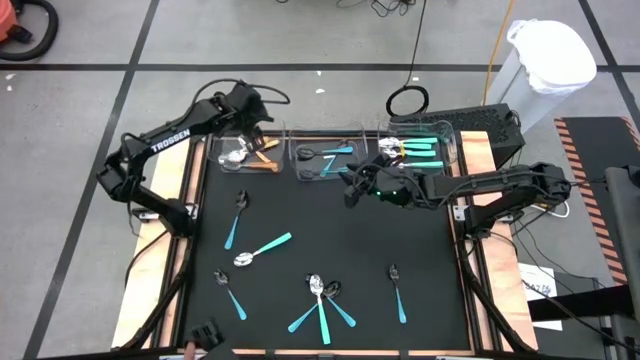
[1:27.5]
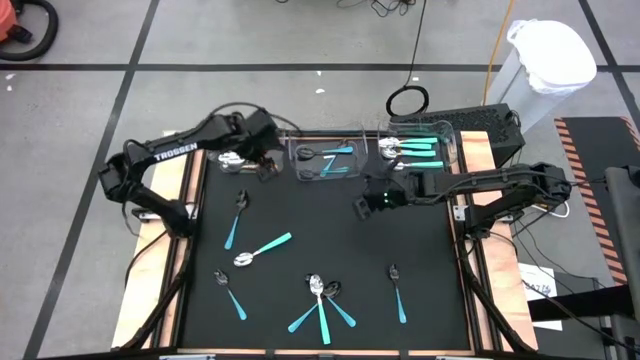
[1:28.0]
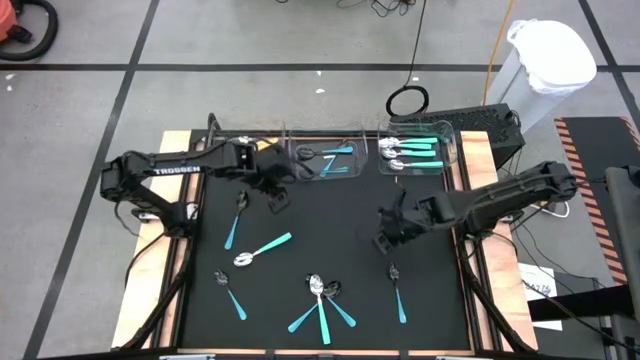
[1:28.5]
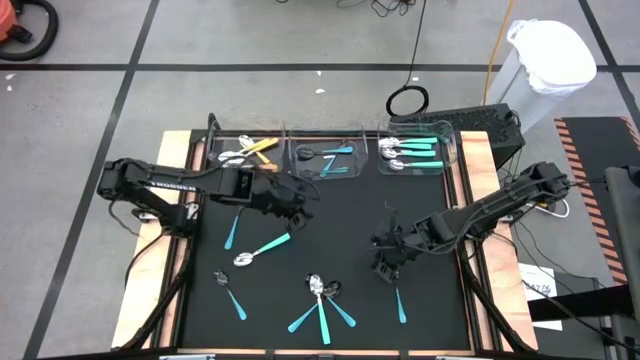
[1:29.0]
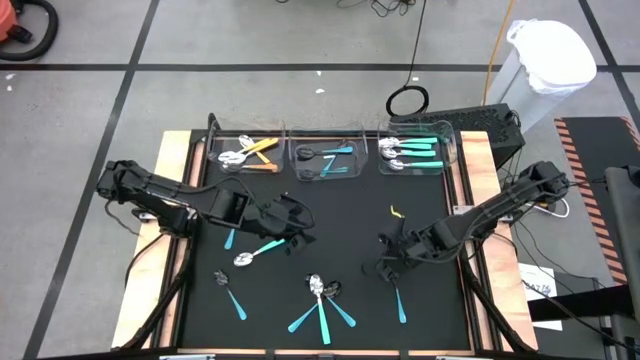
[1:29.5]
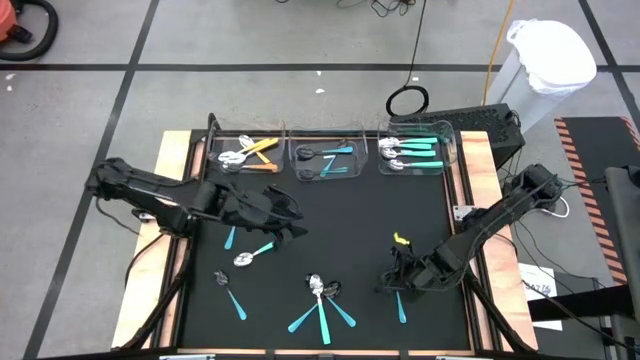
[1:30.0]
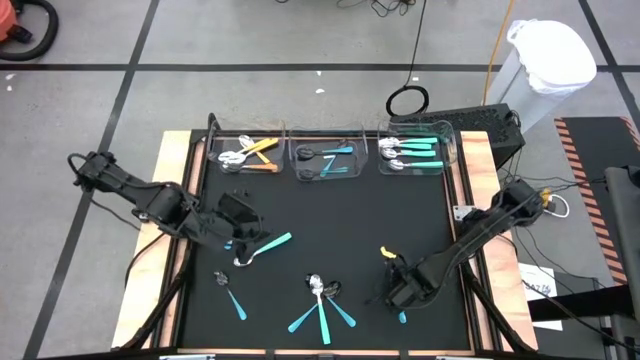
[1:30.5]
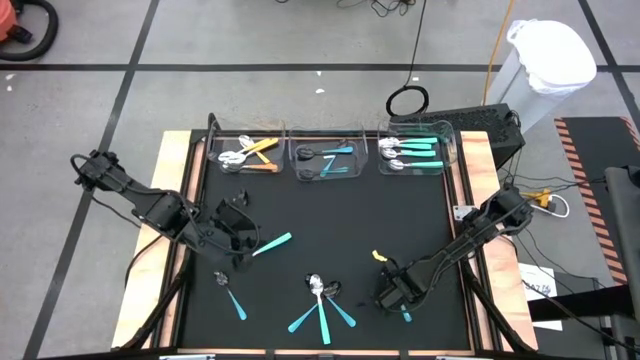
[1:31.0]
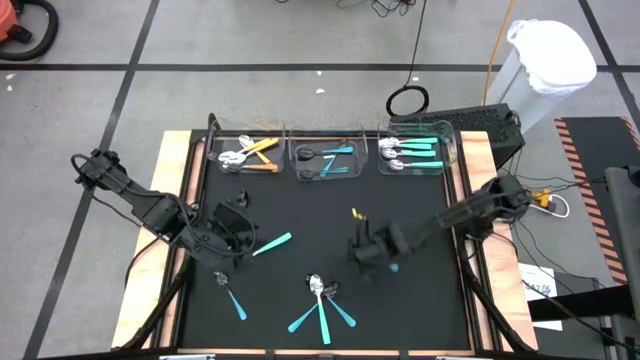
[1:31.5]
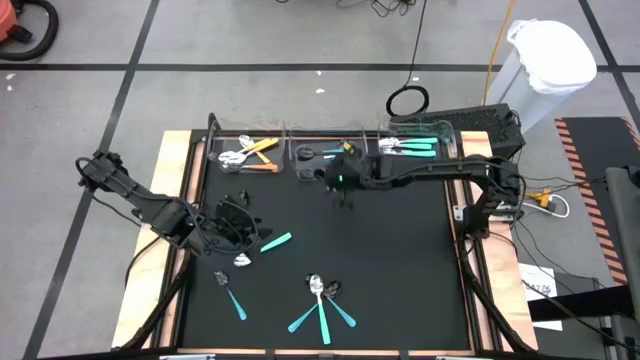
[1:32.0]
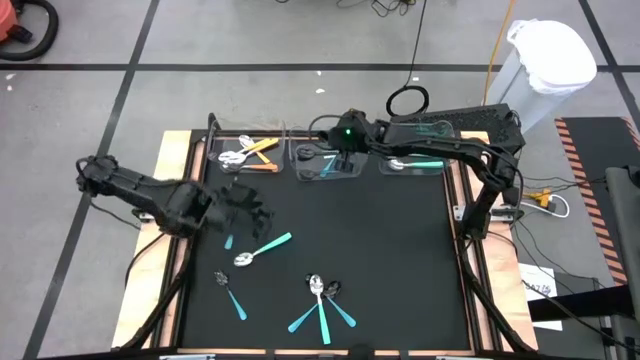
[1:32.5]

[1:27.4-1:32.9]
Task: Sort silverware by color (type)
Put the light blue spoon into the middle transparent bin

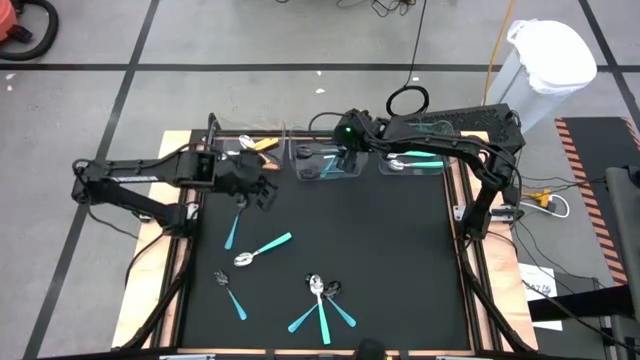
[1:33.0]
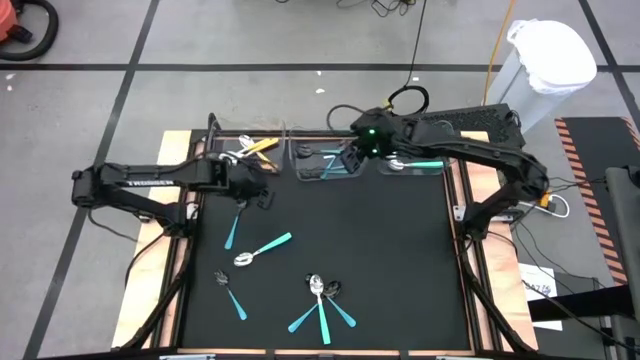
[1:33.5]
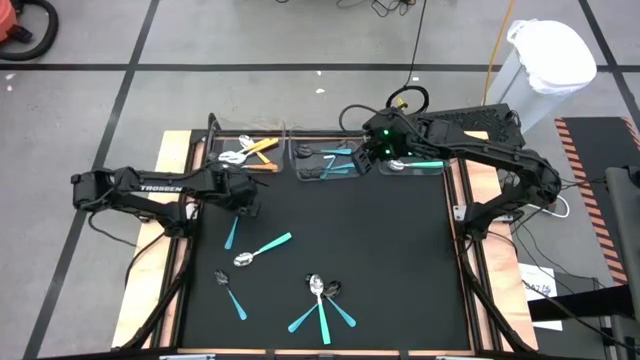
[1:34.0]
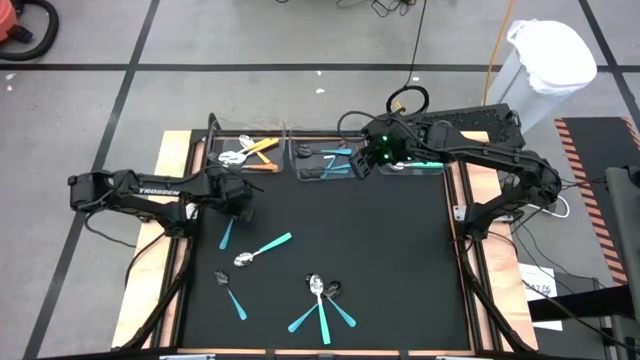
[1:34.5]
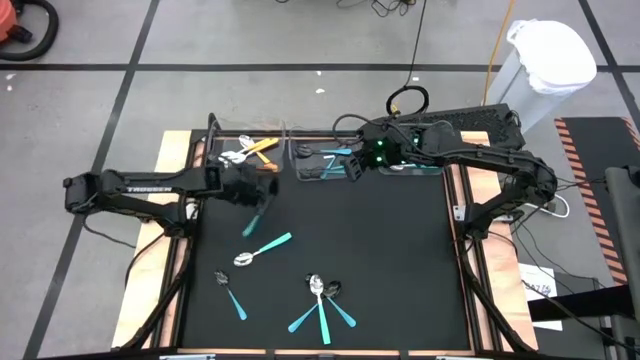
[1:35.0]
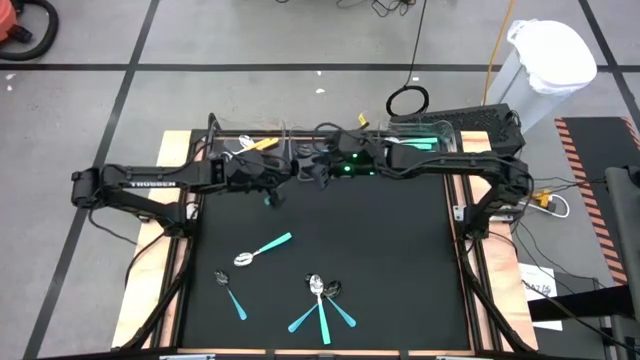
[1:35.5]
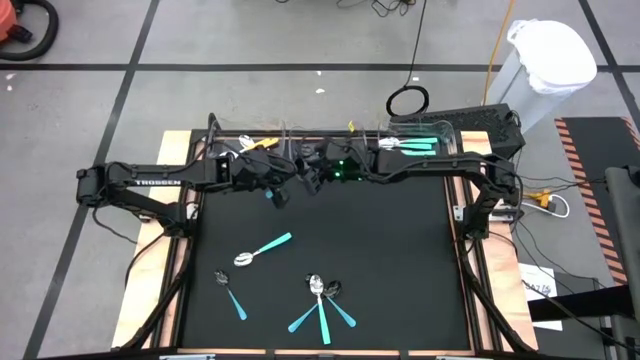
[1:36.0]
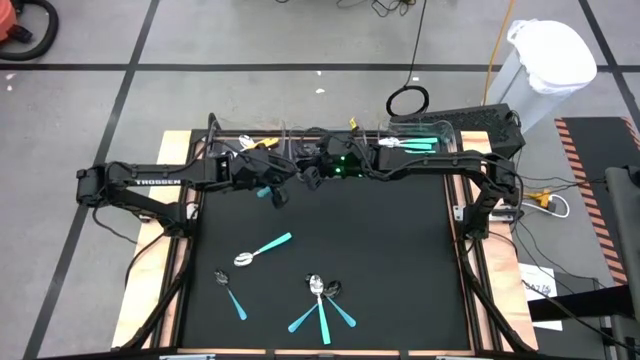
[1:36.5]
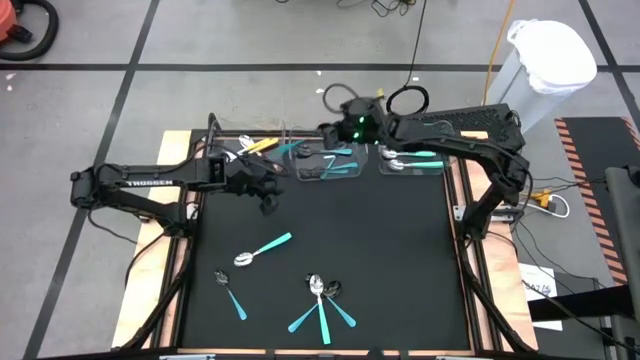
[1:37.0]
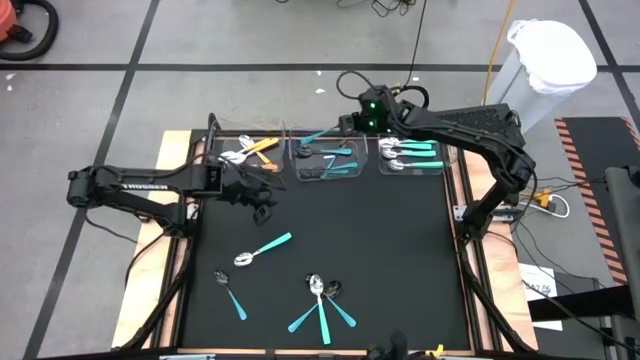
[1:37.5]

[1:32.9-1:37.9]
Put the light blue spoon into the middle transparent bin

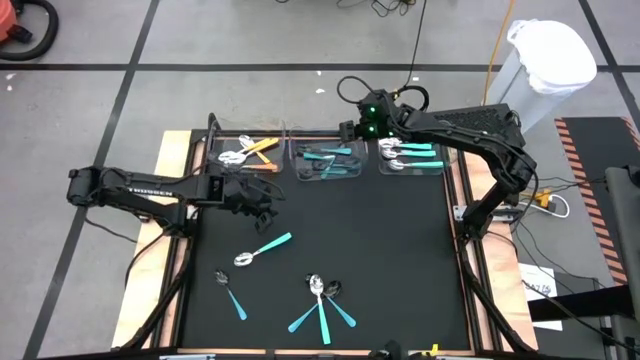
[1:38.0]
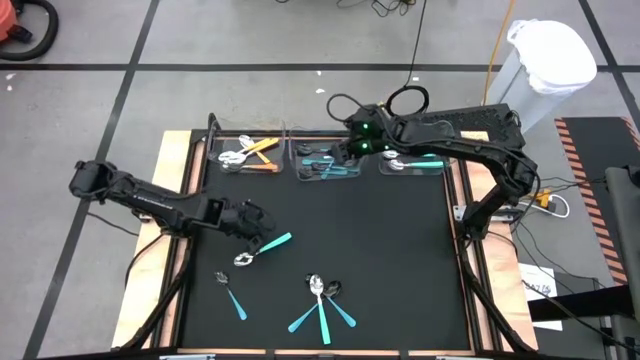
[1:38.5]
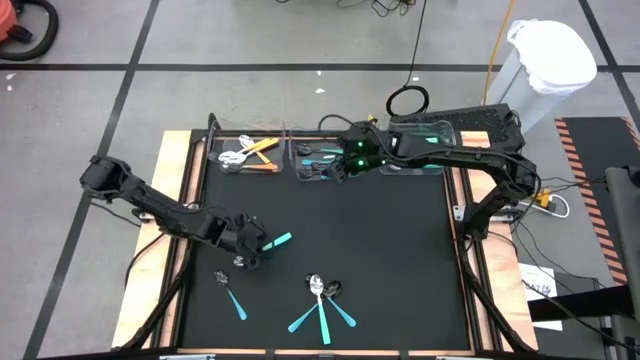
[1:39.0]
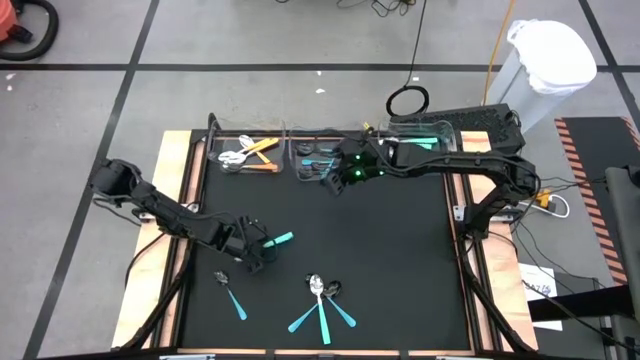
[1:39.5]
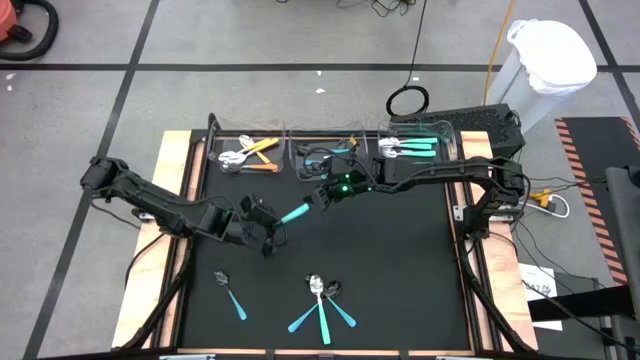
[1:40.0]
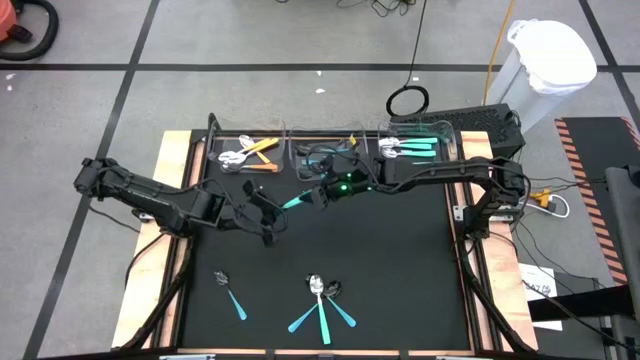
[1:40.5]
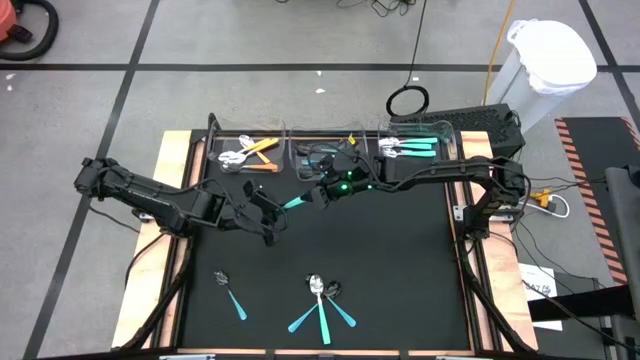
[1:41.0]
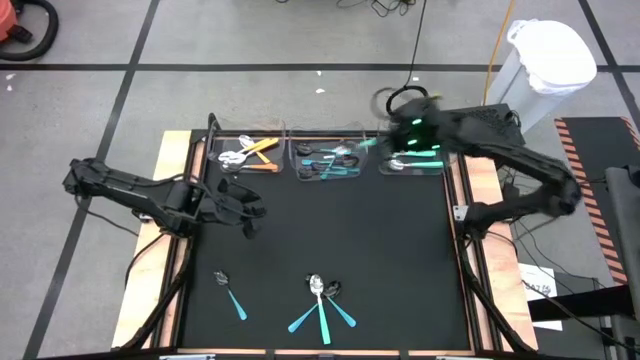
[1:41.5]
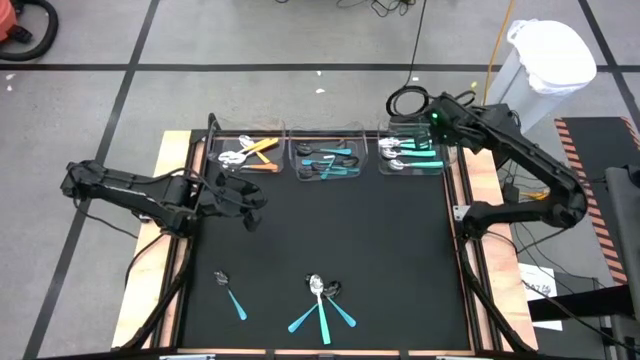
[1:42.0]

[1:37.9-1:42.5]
Put the light green spoon into the right transparent bin

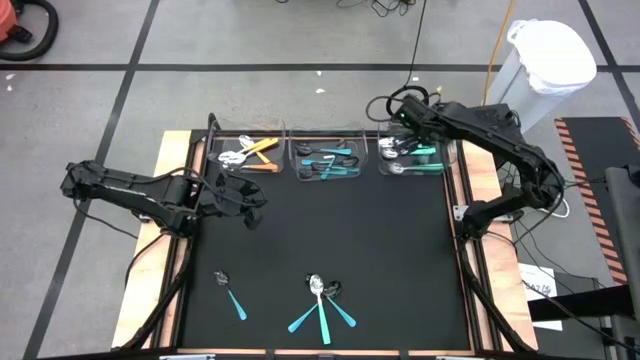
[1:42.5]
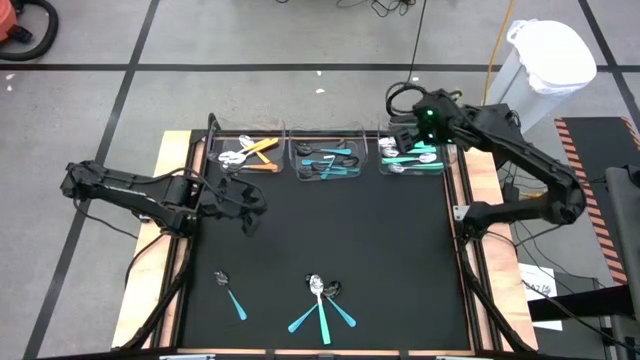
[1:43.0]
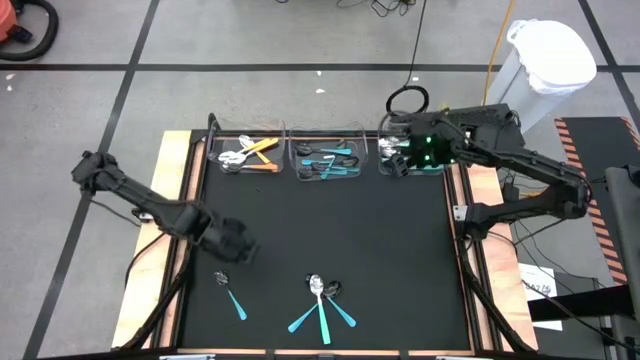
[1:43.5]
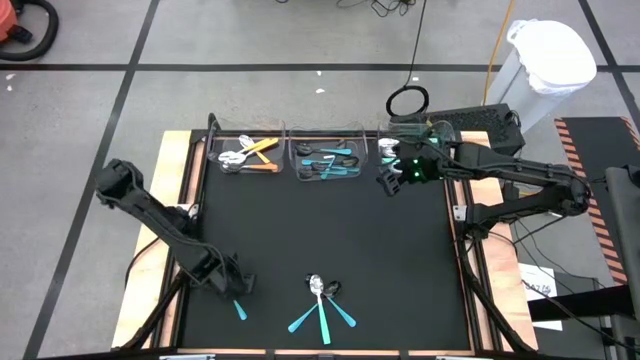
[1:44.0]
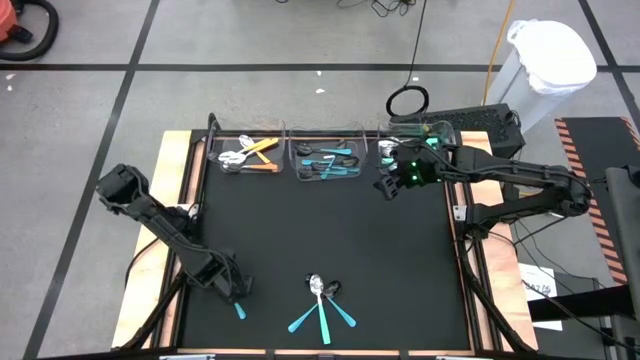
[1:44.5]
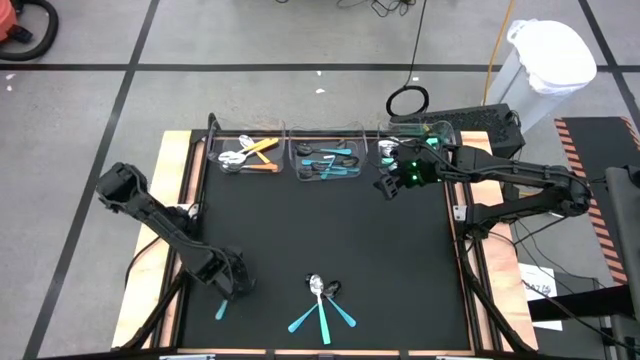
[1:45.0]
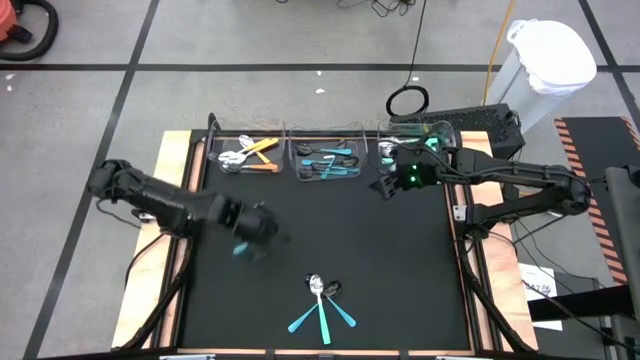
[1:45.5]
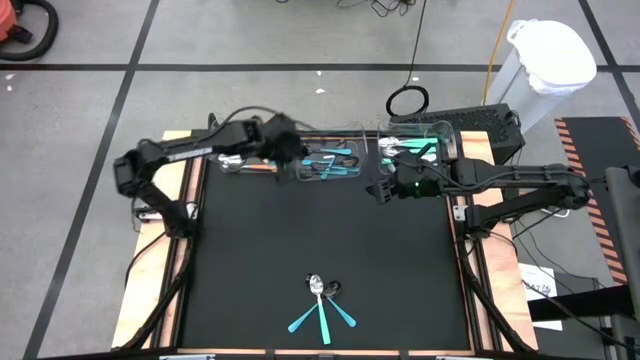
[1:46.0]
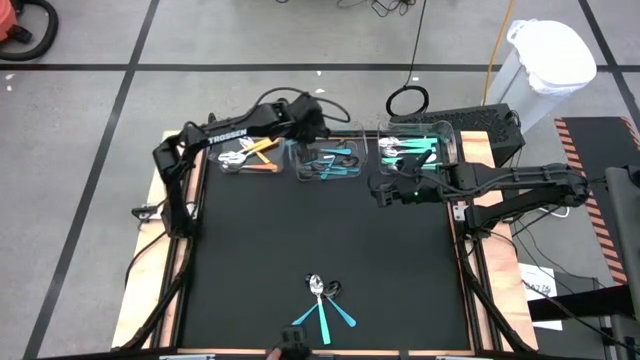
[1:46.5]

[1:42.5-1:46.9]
Put the light blue spoon into the middle transparent bin

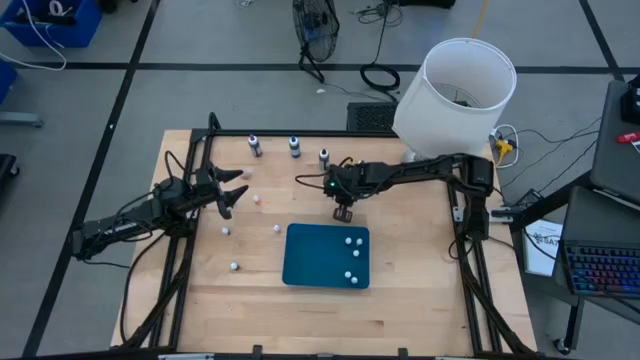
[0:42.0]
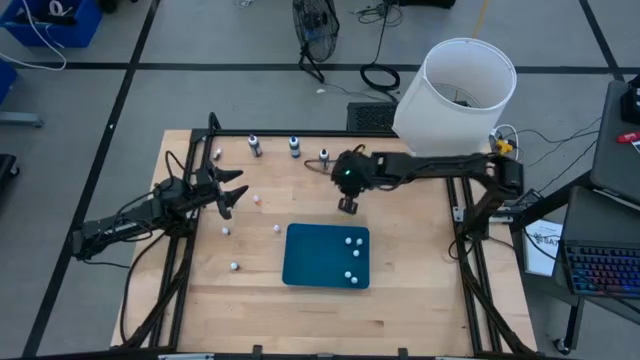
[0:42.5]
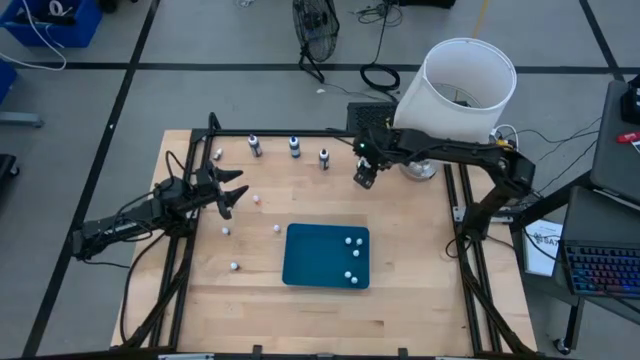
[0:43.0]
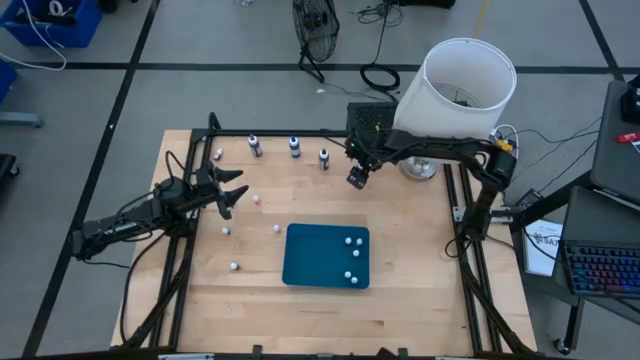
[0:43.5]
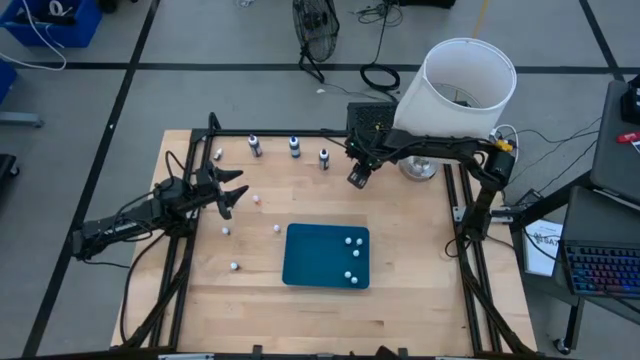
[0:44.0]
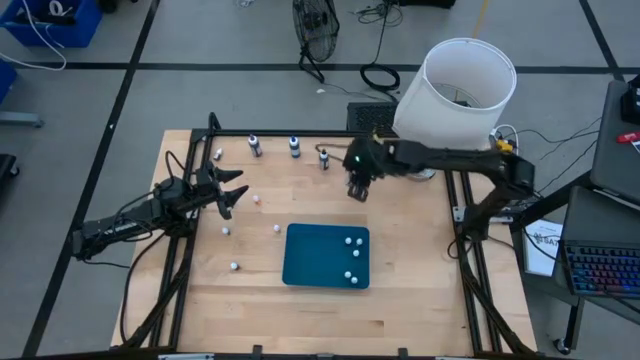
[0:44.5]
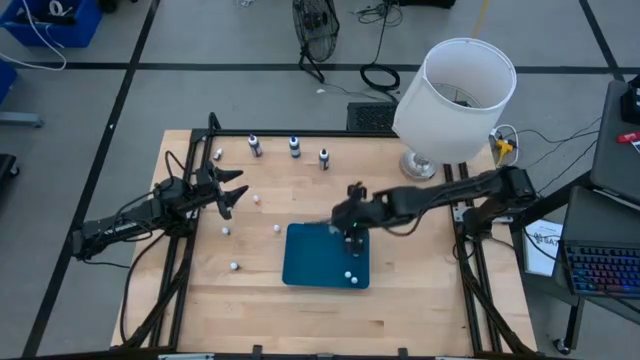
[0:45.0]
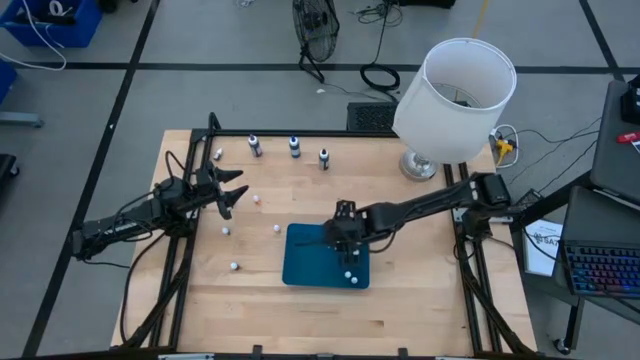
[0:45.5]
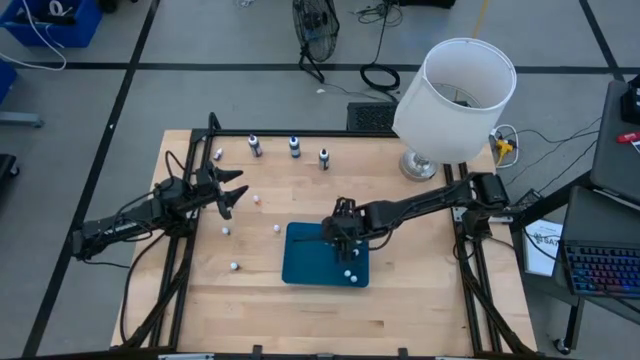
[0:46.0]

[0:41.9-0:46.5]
Task: Pick & Place food coloring
Put the large green food coloring bottle into the blue bin
